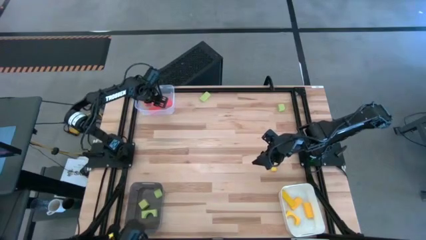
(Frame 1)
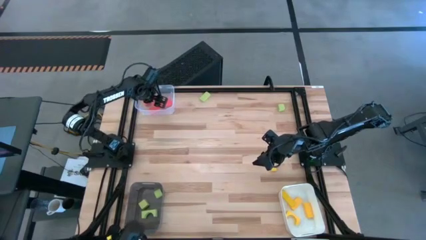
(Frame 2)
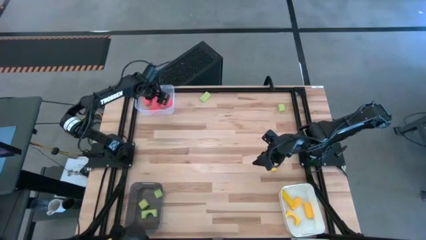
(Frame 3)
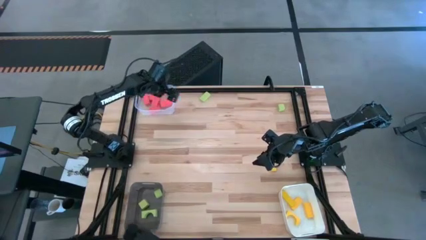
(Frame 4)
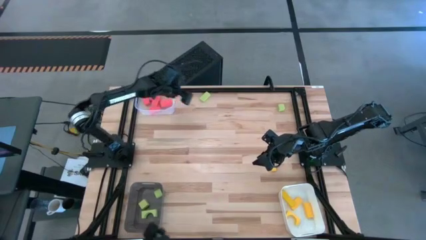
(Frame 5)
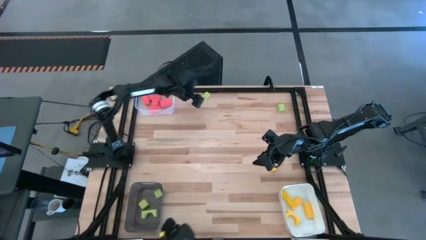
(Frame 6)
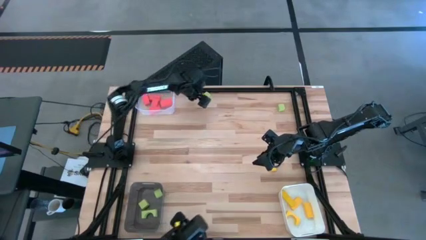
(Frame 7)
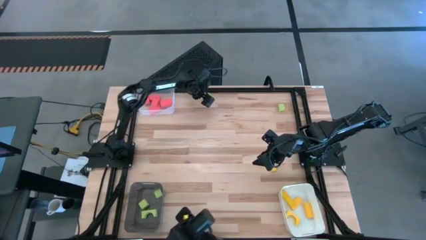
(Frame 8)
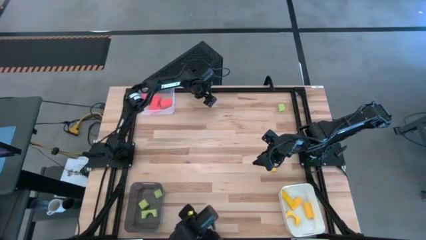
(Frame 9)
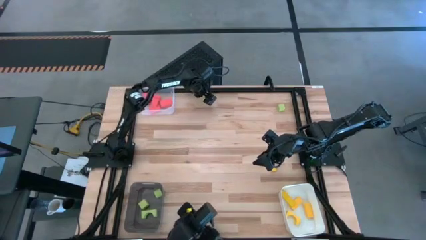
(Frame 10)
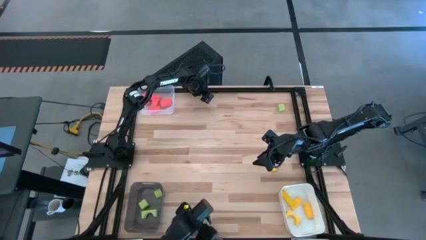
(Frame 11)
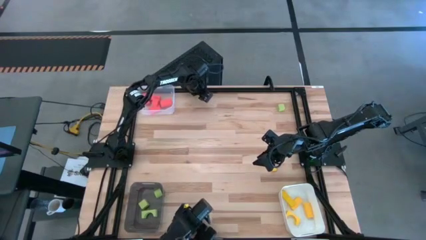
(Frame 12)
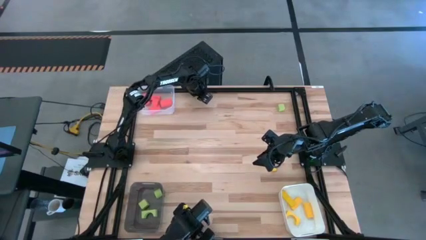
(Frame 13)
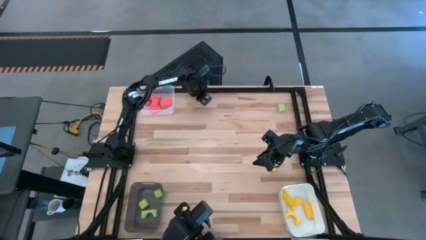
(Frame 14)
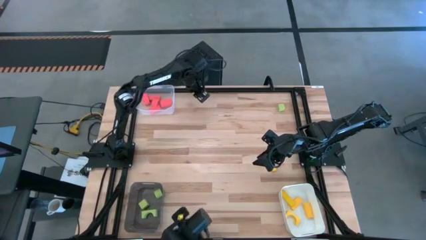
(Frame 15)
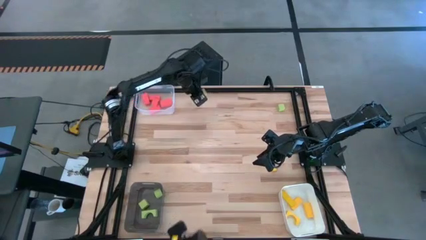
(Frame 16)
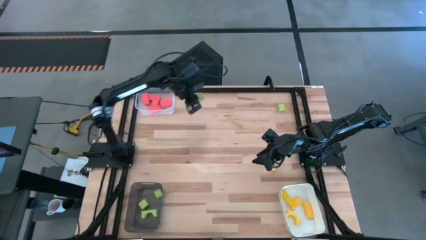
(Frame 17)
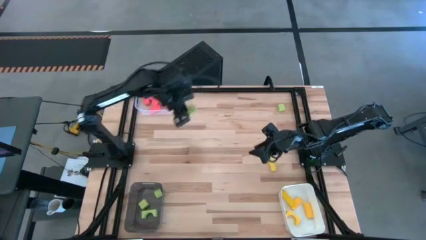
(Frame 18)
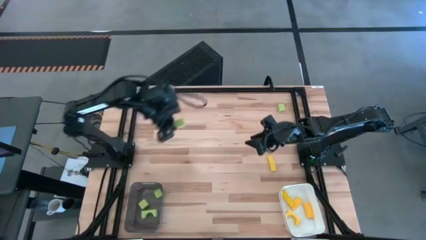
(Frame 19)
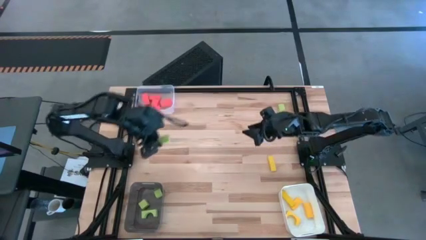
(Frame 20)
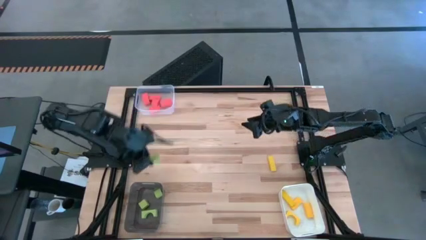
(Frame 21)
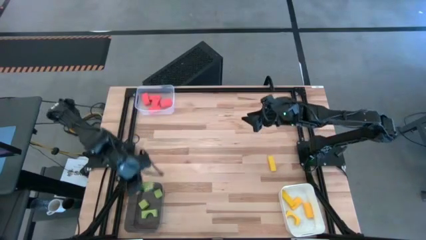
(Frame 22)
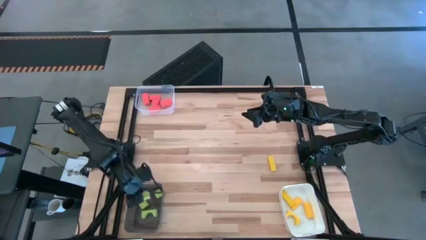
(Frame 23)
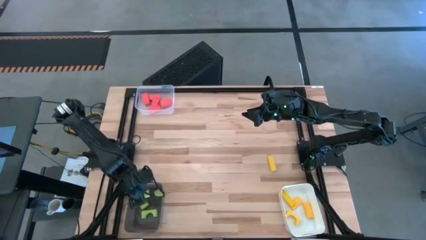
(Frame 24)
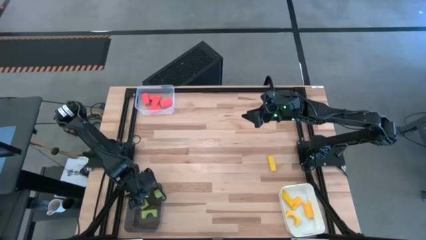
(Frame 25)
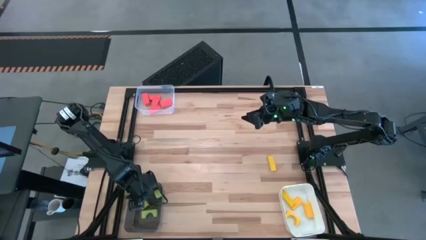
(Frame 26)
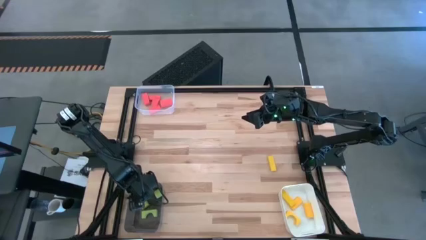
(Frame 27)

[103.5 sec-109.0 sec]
Task: Sort & place blocks by color
Put the green block into the black transparent bin

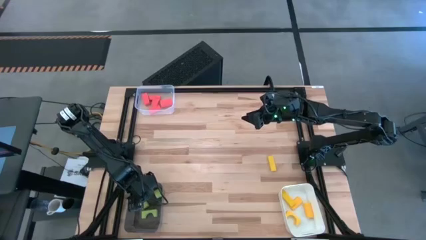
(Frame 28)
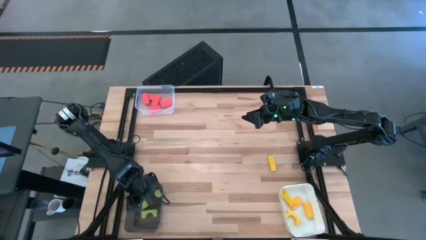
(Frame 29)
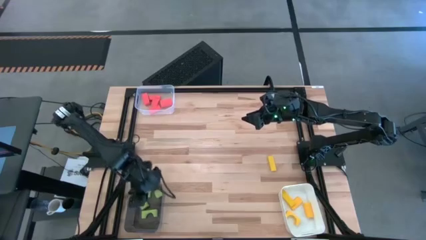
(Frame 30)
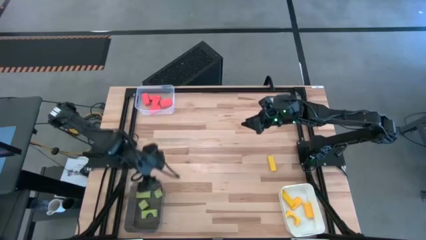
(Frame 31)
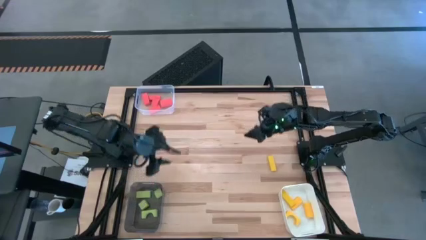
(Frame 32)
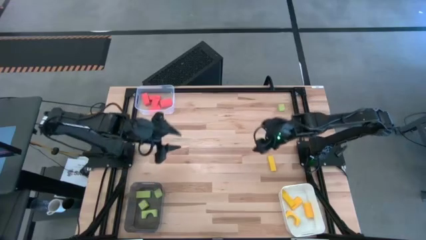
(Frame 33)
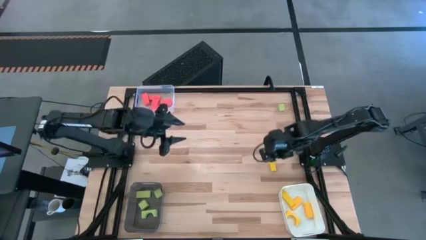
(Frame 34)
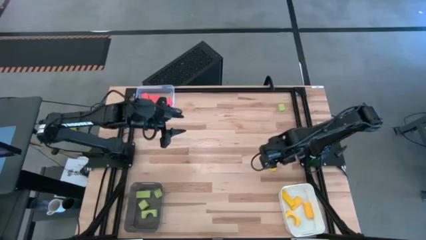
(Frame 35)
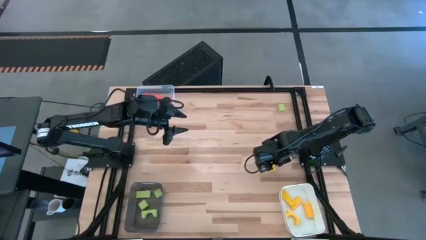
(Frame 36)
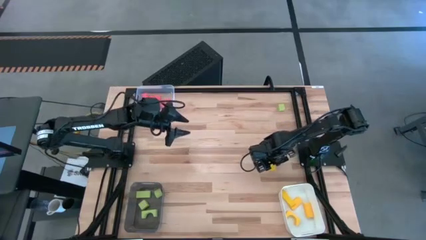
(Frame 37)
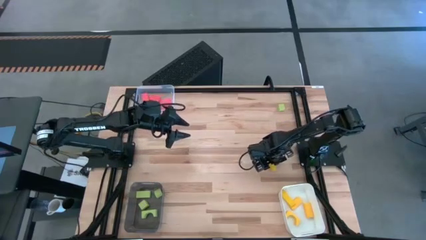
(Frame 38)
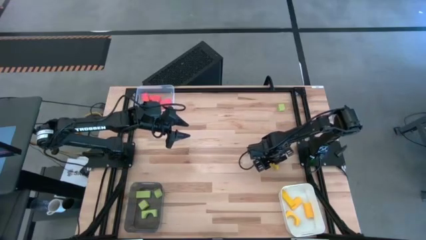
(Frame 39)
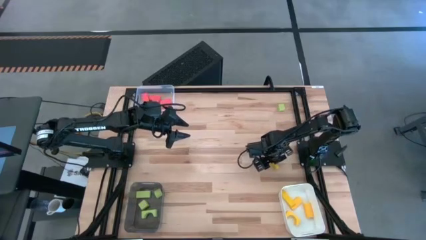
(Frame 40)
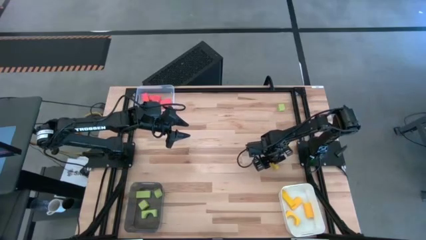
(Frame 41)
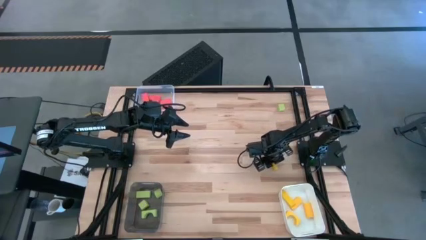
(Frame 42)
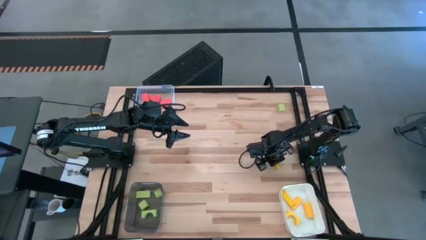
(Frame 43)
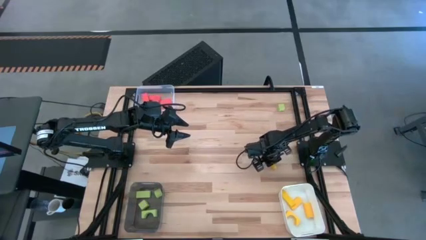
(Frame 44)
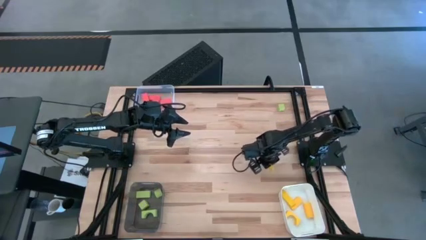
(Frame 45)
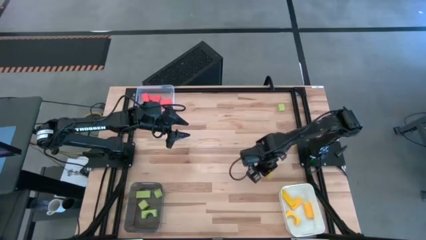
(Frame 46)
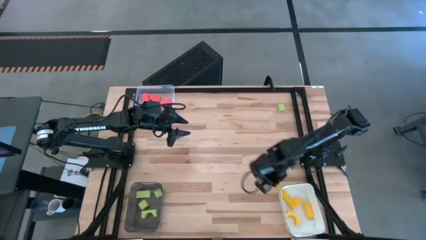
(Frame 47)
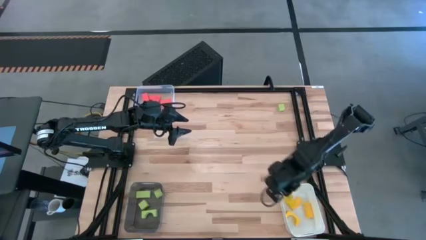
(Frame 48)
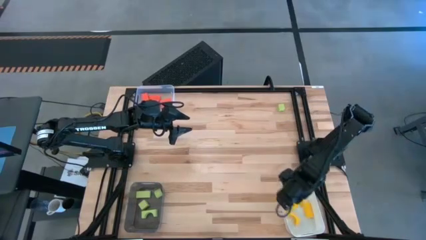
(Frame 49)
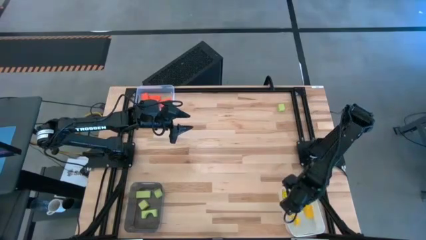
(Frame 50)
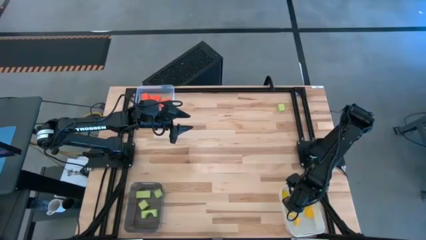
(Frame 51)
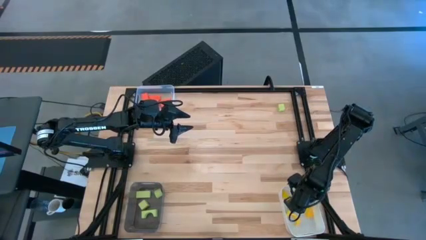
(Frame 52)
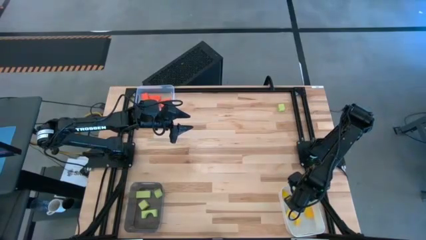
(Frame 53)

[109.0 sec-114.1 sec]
Put the yellow block into the white bin

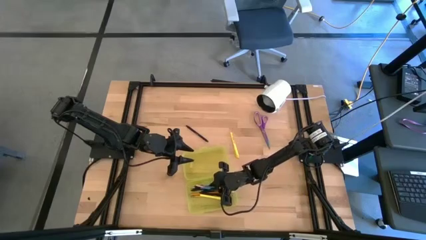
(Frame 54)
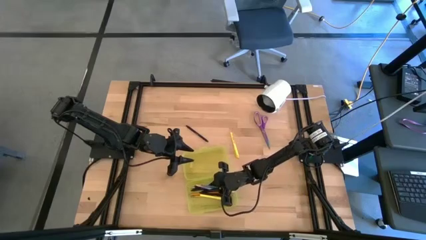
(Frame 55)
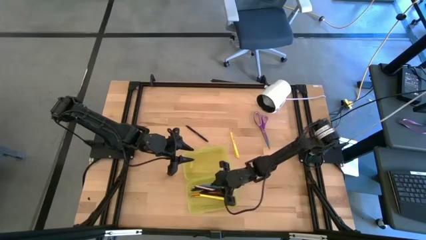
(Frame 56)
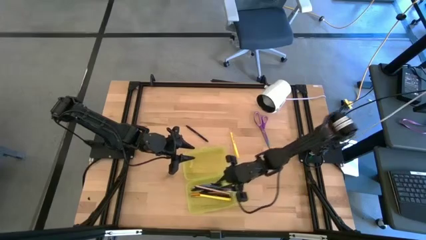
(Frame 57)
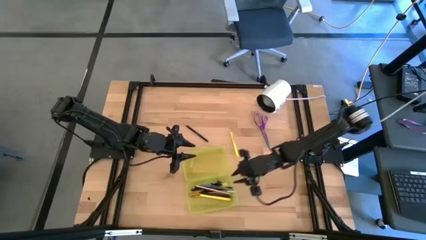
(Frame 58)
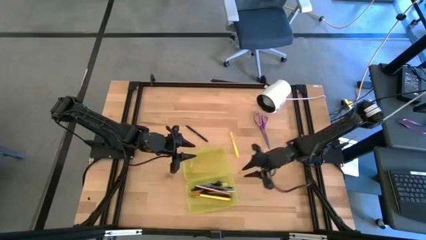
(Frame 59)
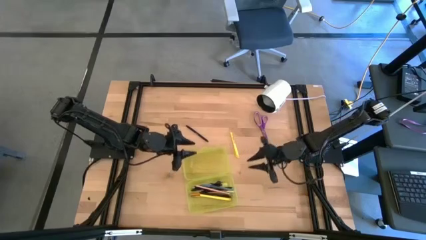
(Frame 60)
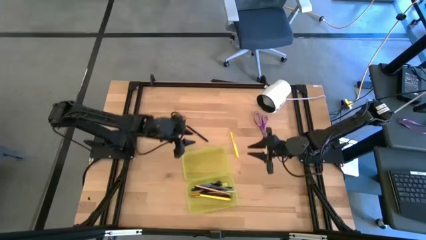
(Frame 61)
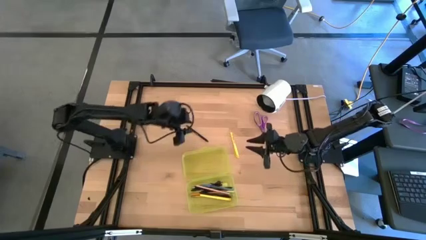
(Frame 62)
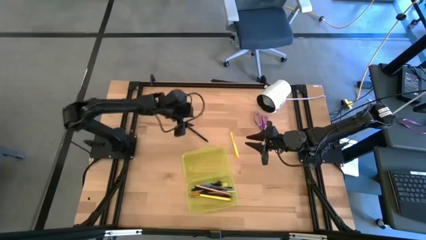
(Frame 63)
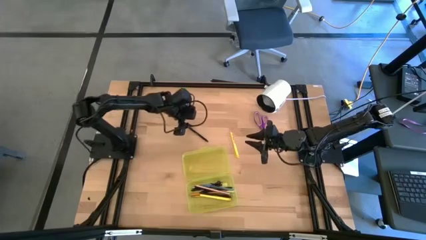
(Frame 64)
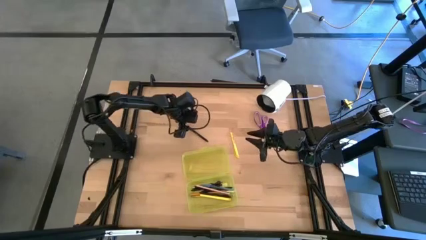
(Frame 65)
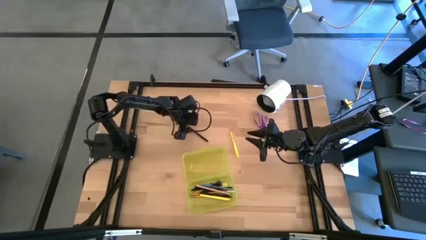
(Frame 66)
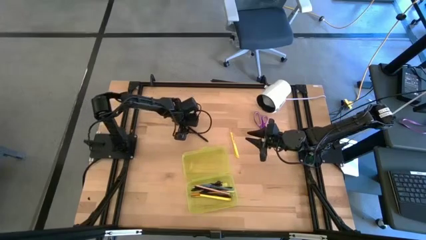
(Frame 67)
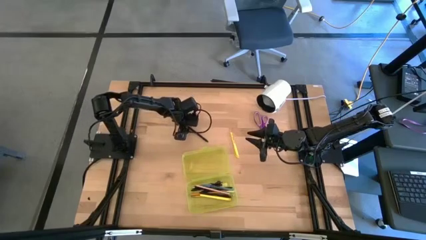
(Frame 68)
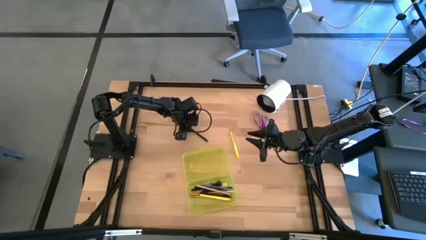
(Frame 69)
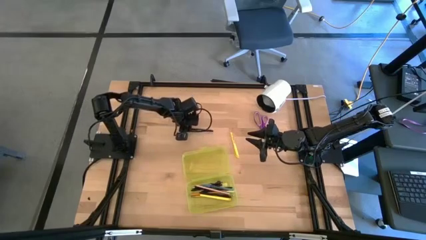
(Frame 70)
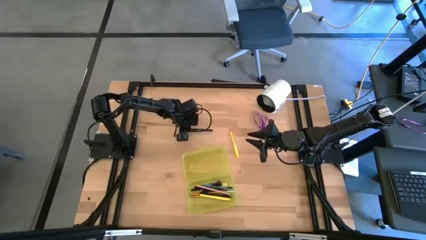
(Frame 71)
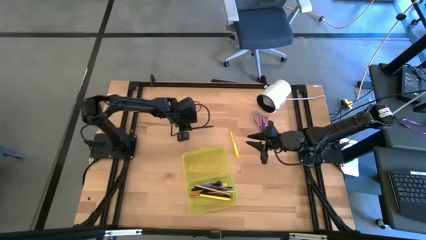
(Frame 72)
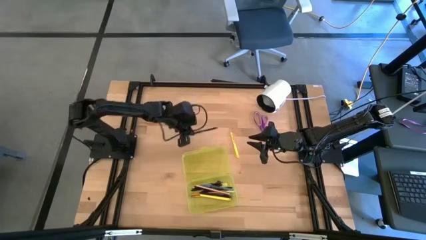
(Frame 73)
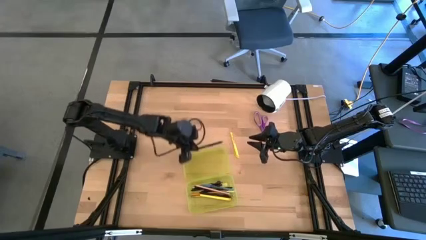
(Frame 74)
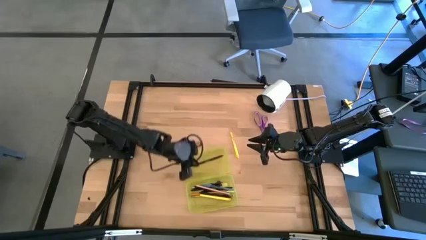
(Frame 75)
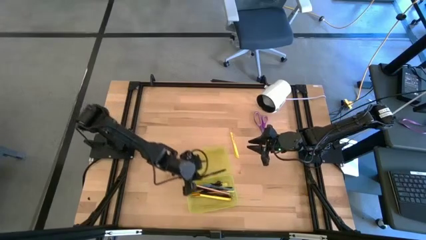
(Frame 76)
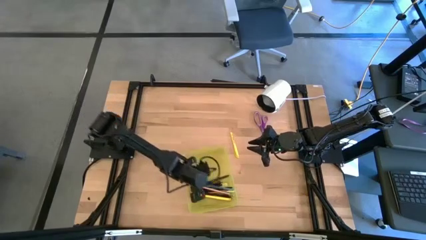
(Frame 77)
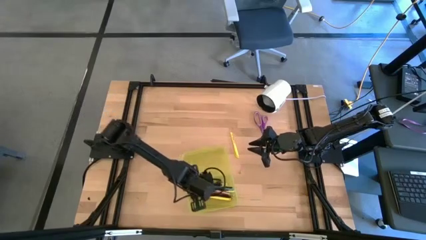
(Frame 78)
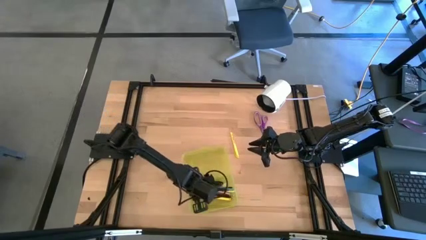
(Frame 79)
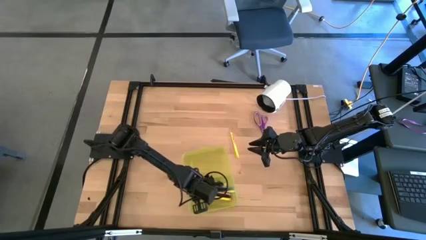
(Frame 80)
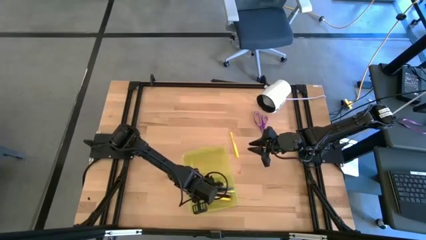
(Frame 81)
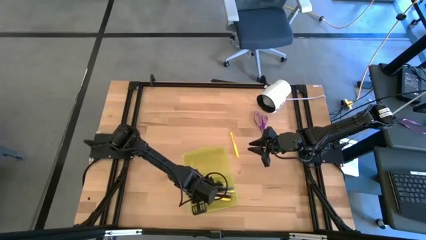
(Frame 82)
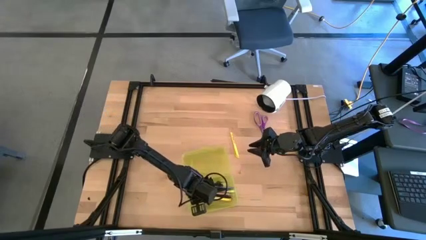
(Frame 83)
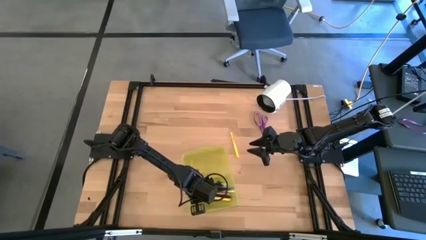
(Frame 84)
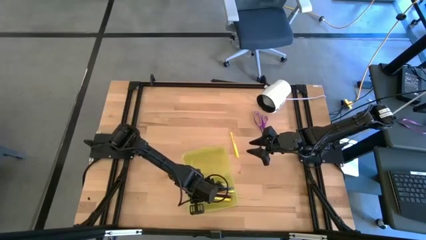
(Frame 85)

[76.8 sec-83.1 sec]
Task: Pick & place school supplies into a supply box
Put the black pen into the yellow supplies box
